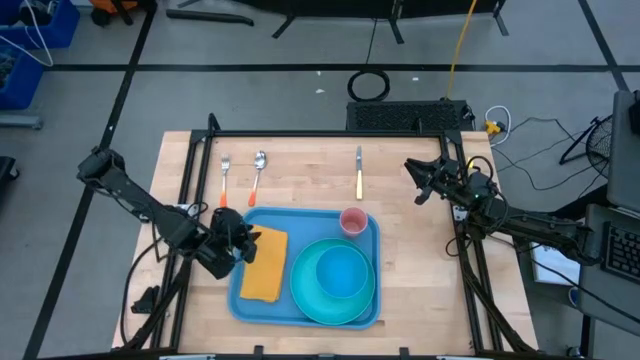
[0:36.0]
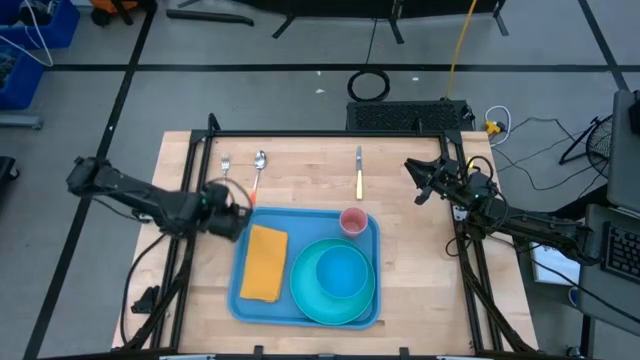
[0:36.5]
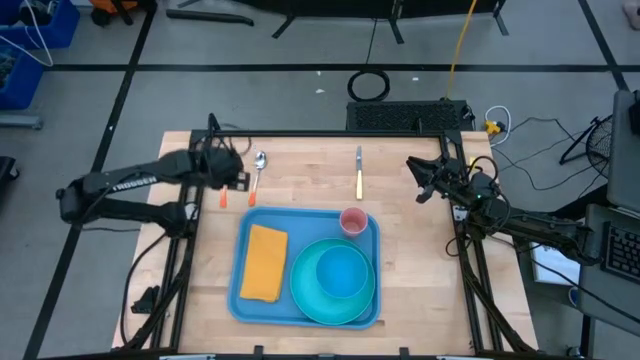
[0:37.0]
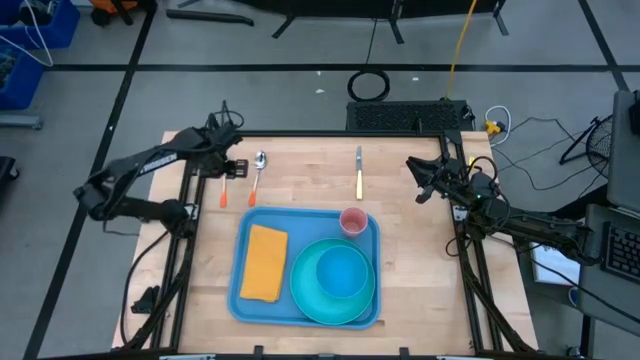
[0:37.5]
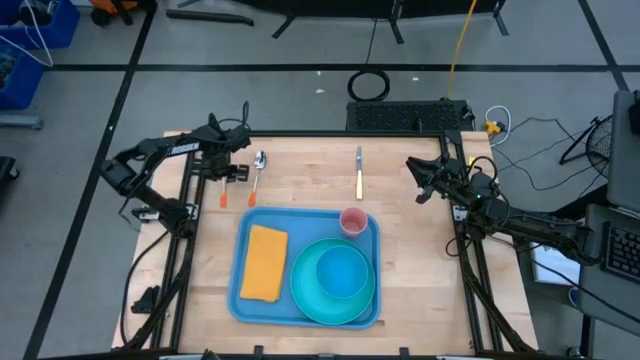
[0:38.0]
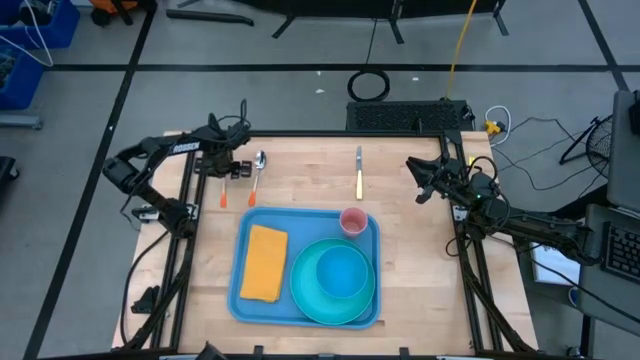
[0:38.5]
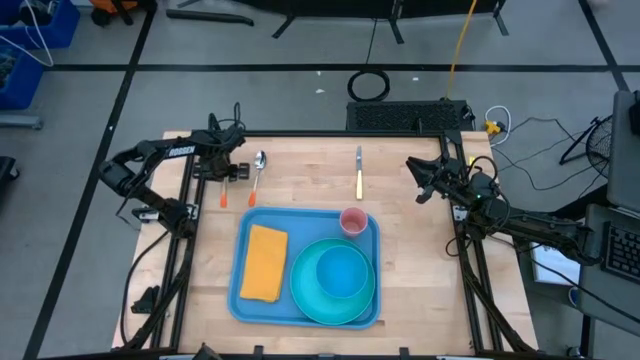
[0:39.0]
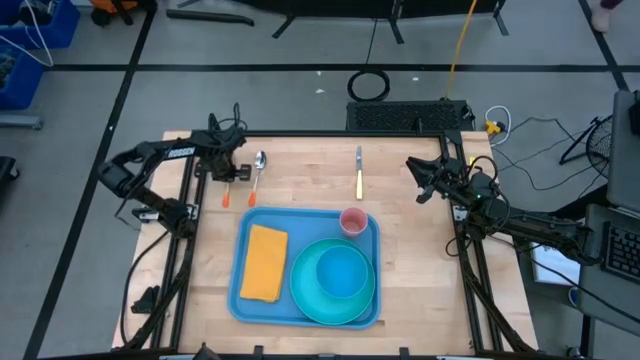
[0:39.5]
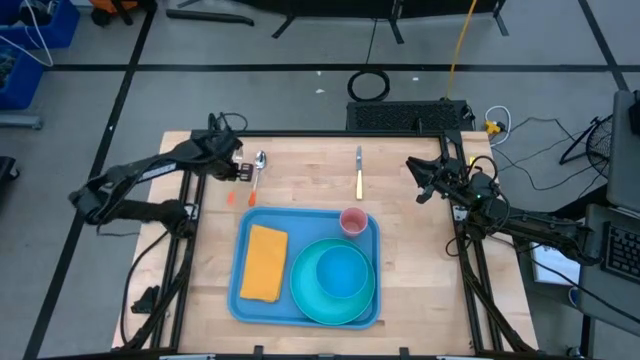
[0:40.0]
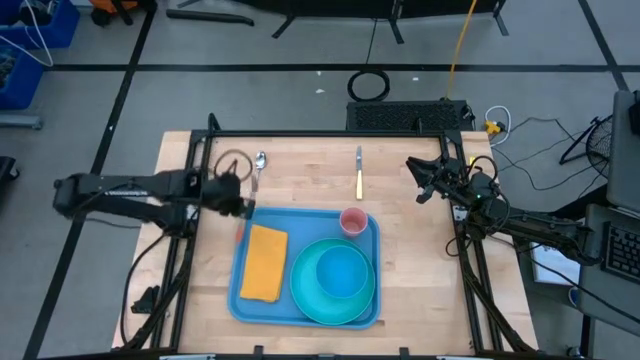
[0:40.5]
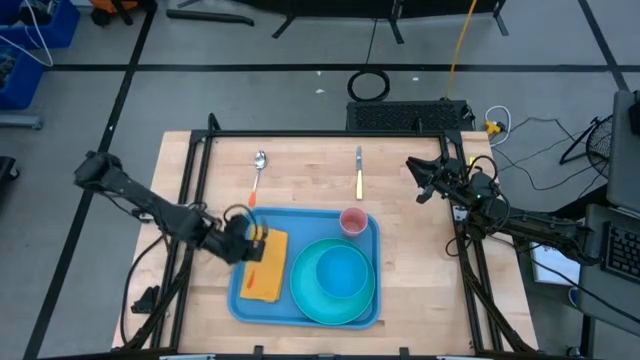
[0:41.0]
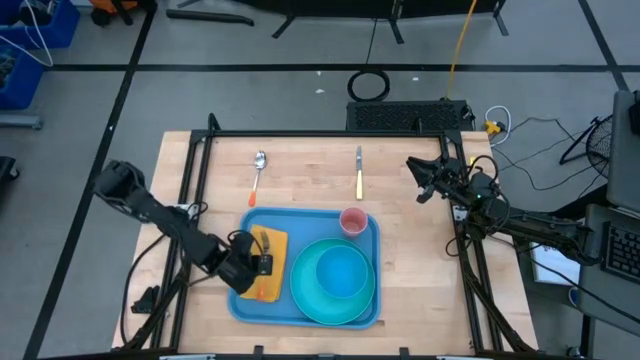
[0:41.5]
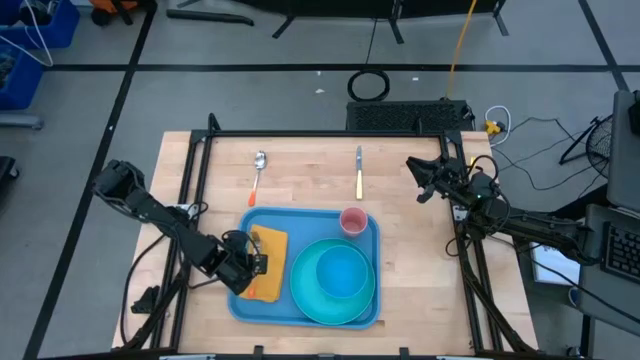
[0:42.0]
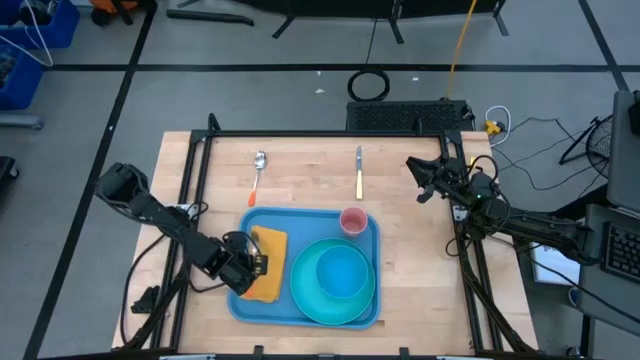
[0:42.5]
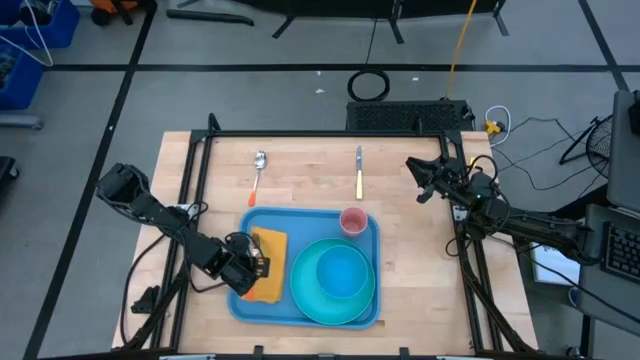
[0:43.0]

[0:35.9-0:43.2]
Task: Set up tray
Put the orange fork on the yellow napkin

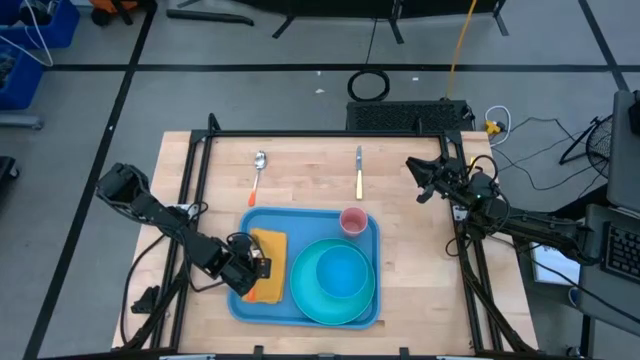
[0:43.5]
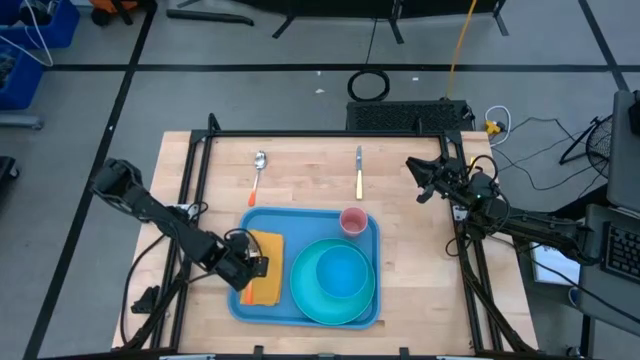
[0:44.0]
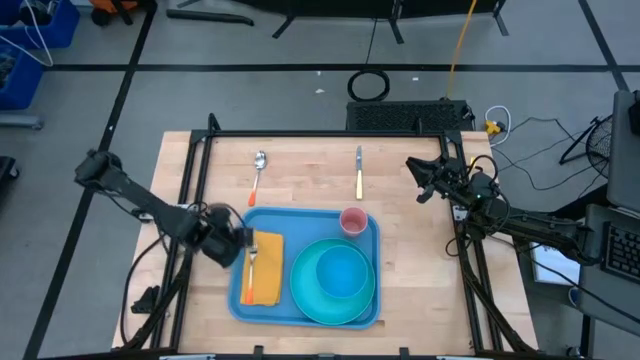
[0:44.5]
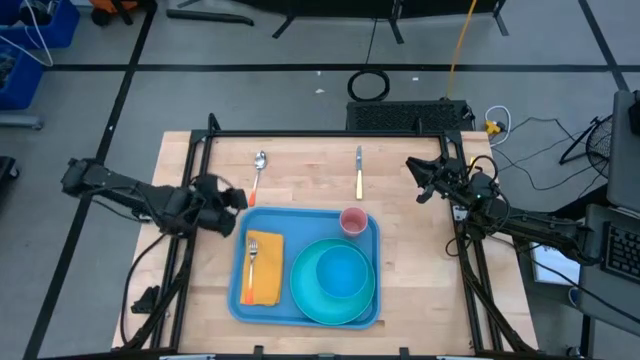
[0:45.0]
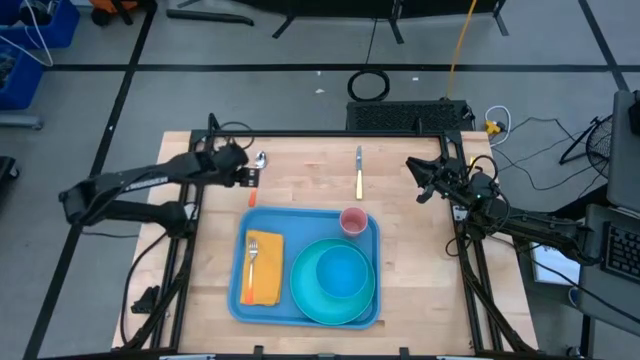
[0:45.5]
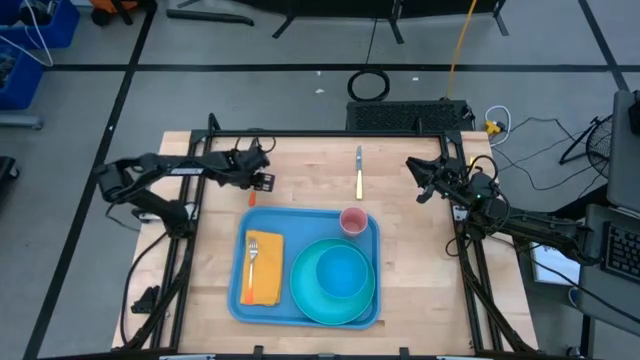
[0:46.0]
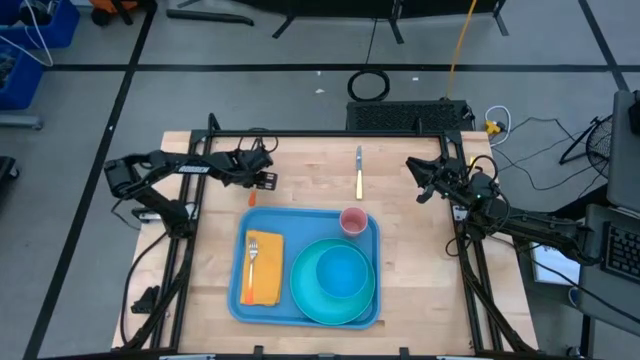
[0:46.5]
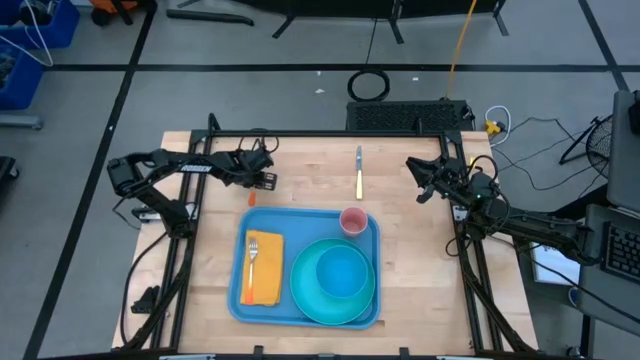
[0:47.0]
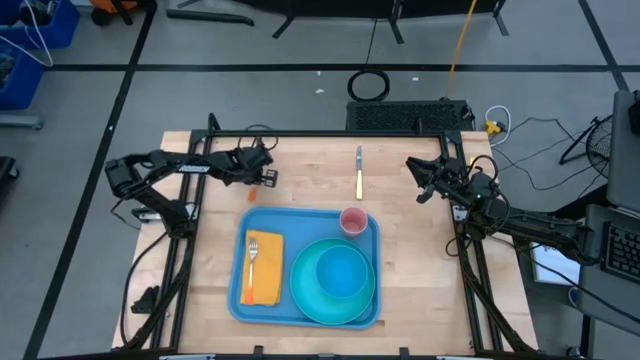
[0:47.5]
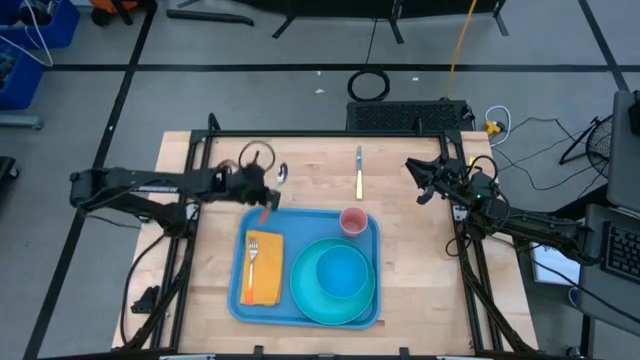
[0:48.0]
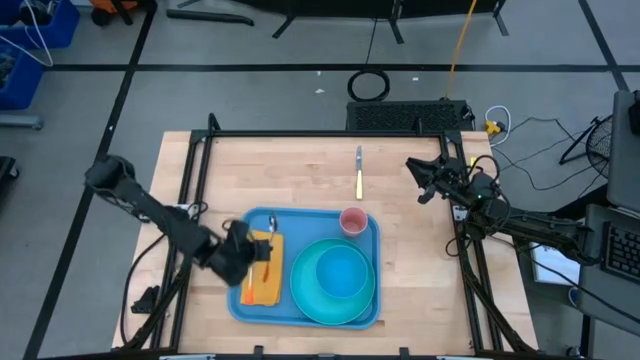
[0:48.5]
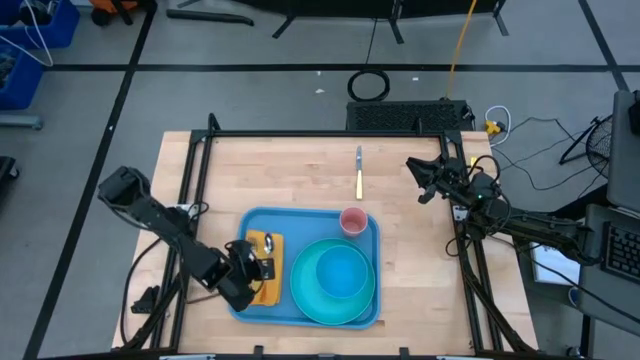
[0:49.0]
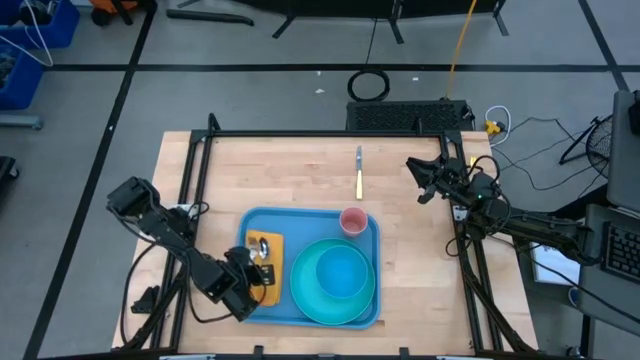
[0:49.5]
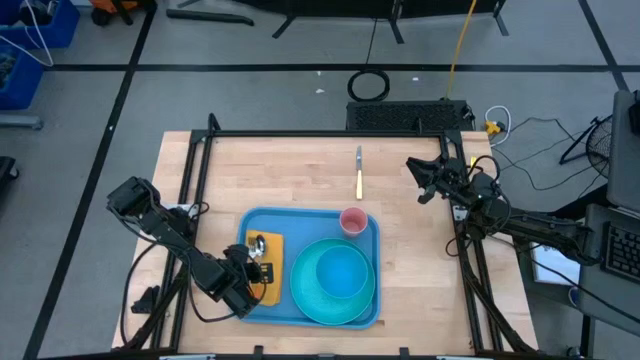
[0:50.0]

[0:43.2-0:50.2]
Put the orange spoon on the yellow napkin to the right of the orange fork

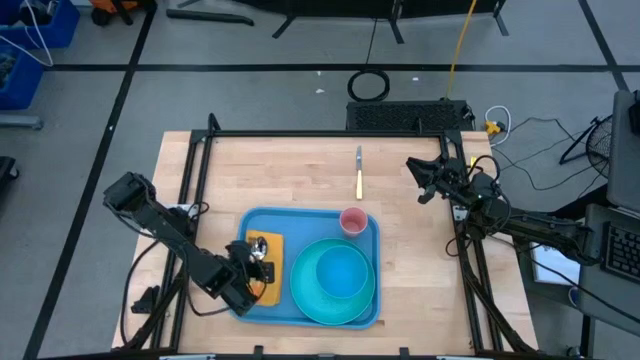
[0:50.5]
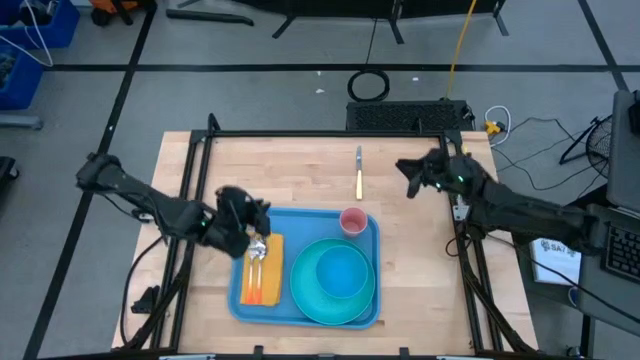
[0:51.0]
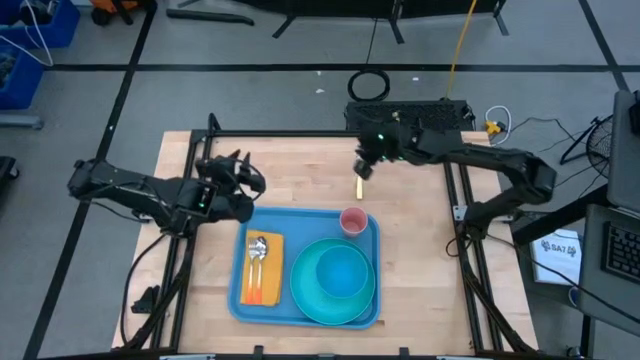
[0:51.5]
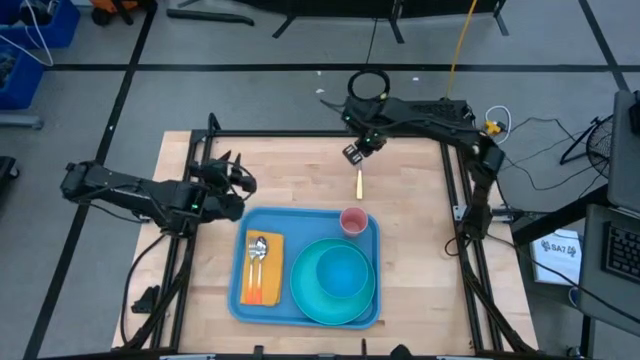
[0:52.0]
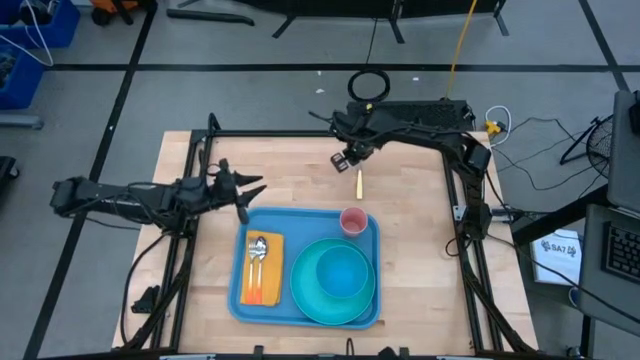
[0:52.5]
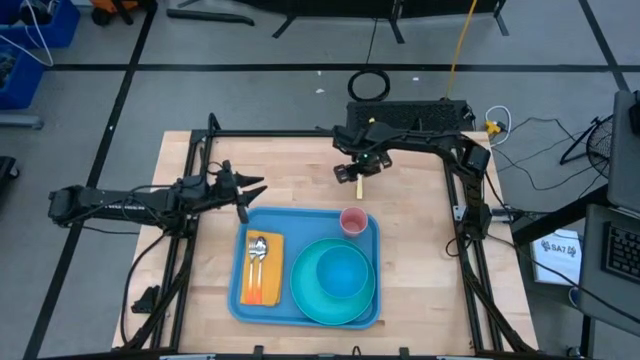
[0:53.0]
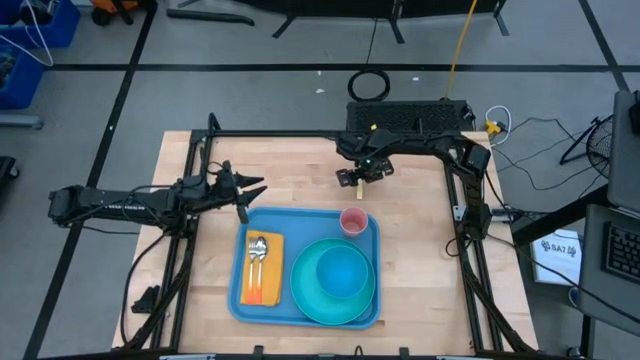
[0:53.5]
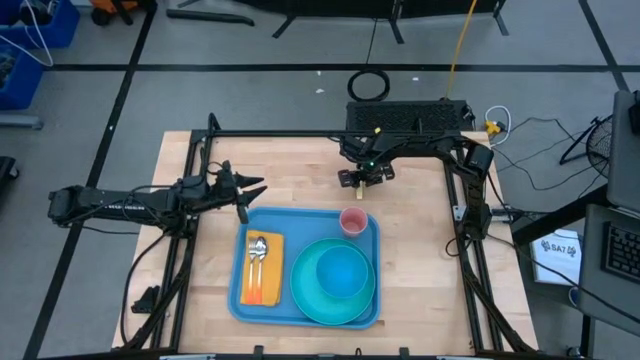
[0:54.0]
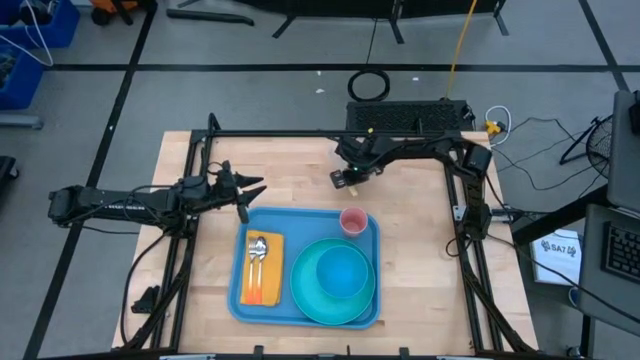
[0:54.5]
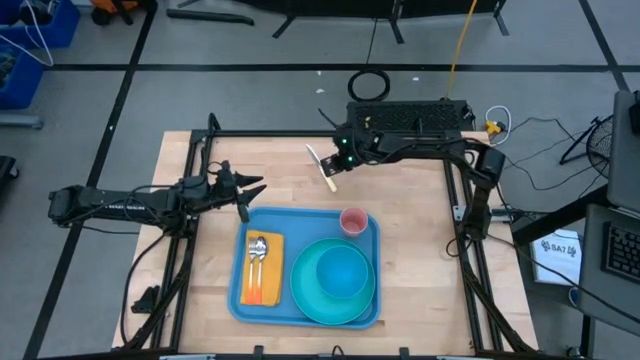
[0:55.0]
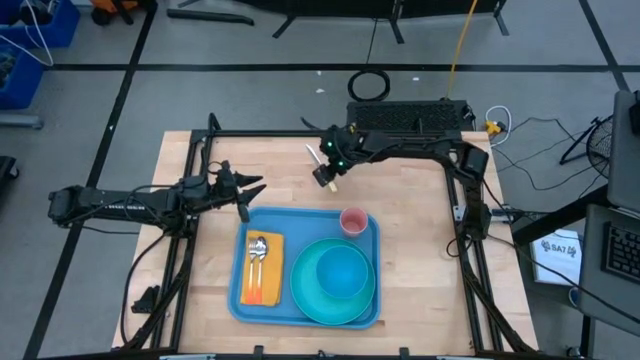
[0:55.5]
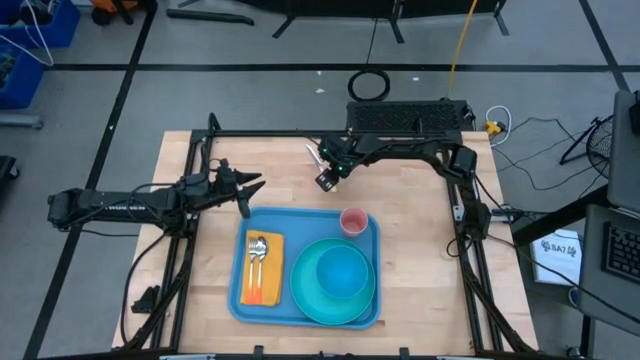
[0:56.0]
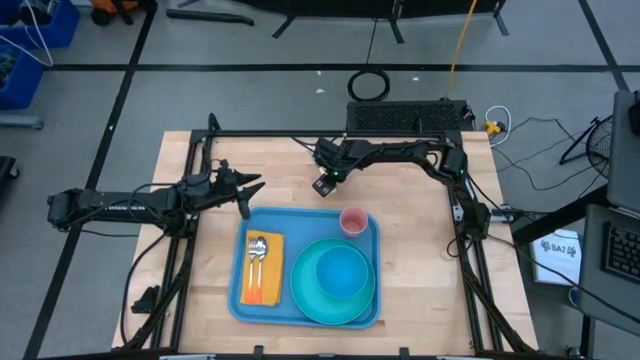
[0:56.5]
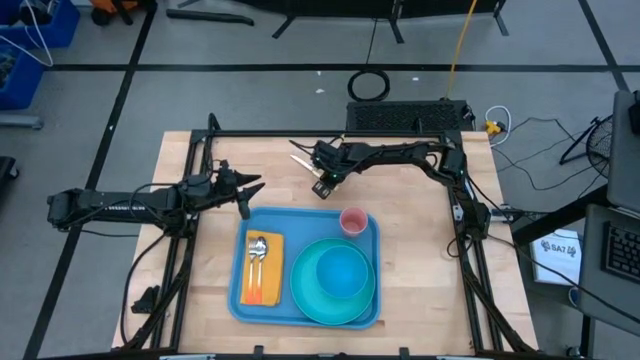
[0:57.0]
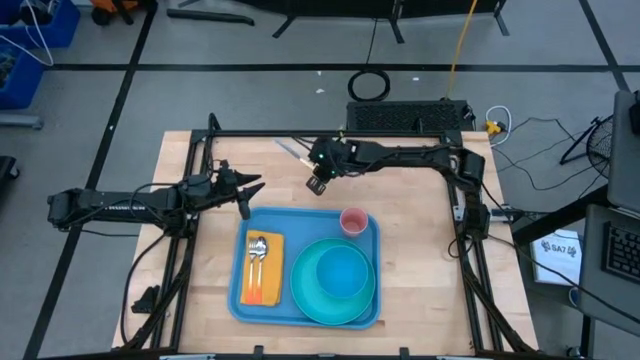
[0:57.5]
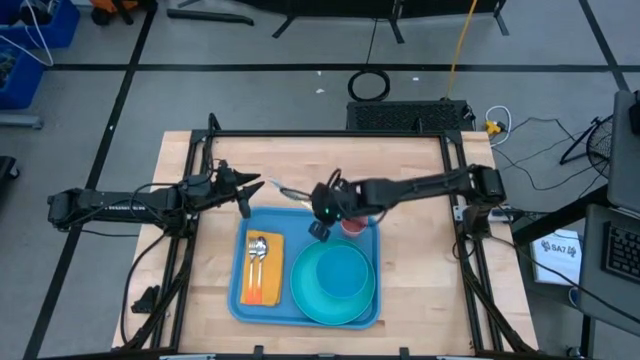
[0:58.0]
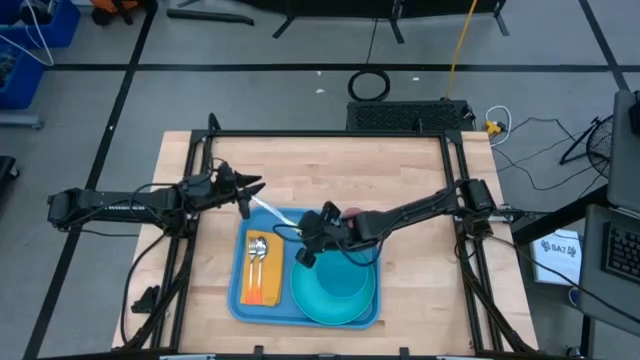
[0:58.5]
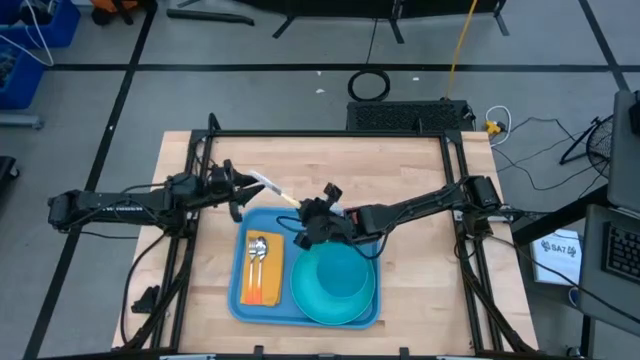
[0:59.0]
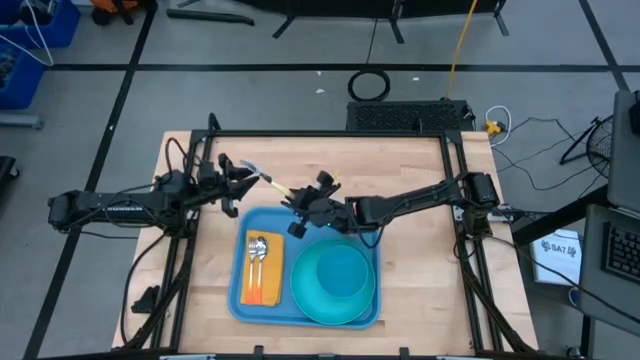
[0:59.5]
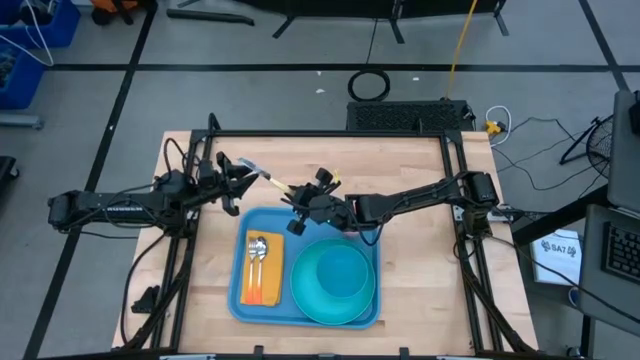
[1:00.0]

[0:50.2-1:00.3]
Put the yellow knife on the yellow napkin to the right of the orange spoon
